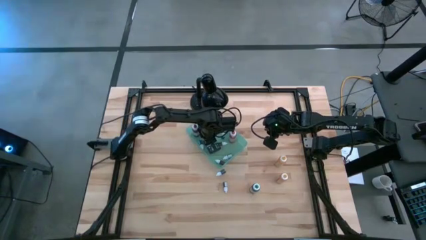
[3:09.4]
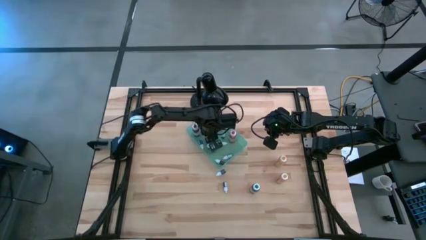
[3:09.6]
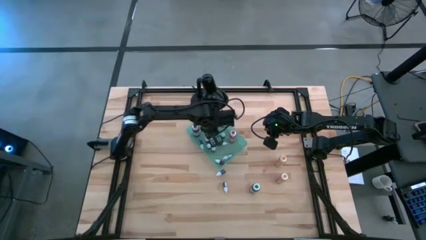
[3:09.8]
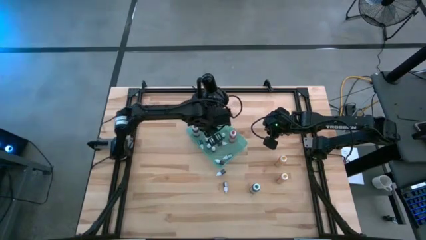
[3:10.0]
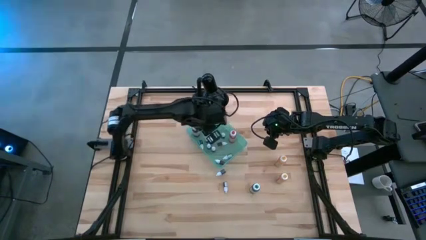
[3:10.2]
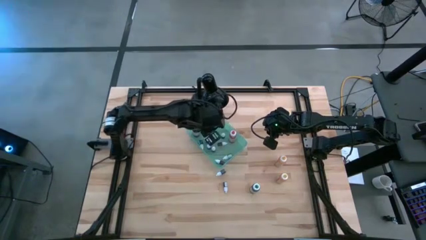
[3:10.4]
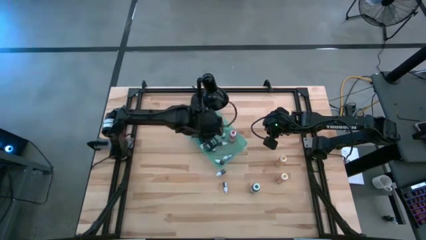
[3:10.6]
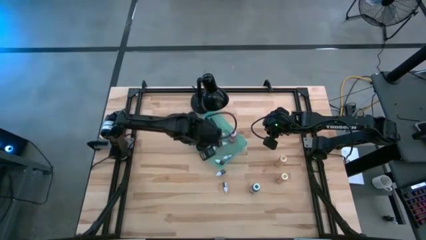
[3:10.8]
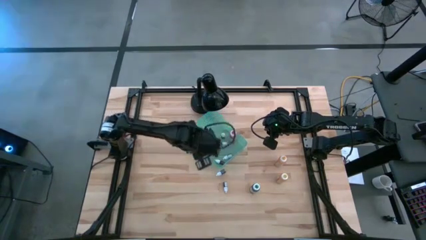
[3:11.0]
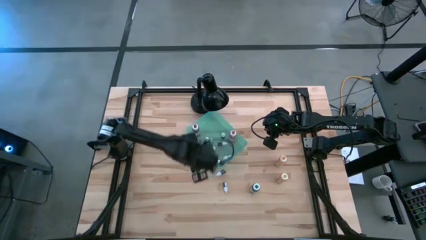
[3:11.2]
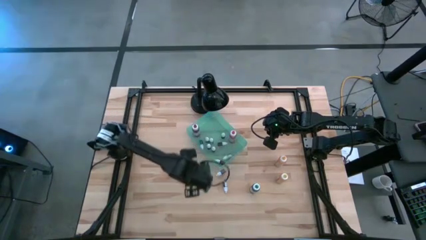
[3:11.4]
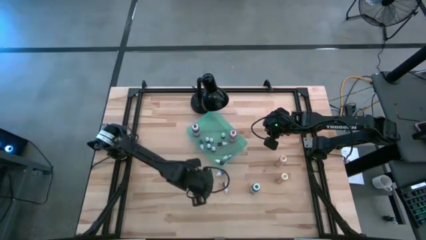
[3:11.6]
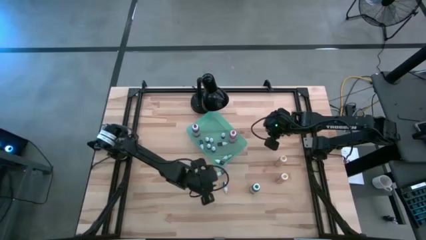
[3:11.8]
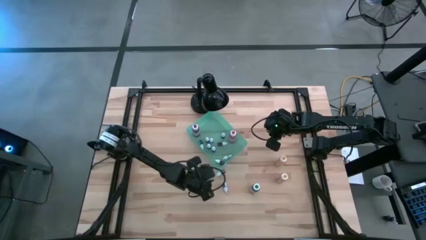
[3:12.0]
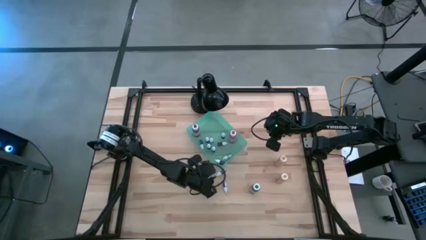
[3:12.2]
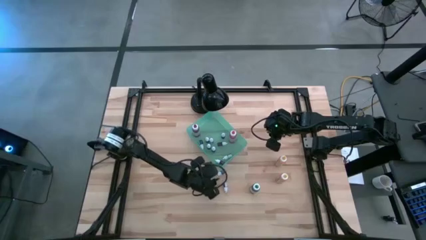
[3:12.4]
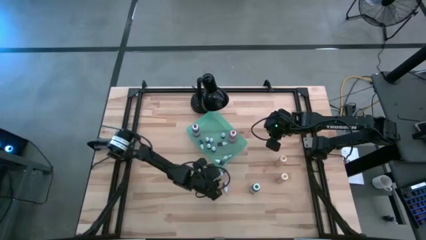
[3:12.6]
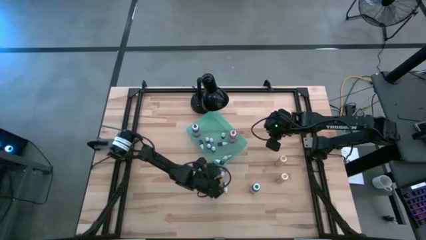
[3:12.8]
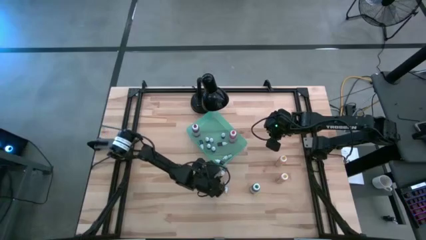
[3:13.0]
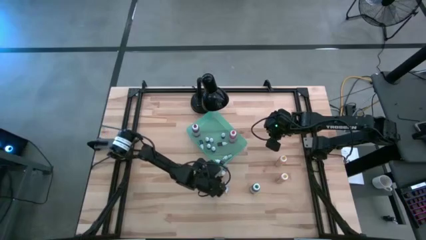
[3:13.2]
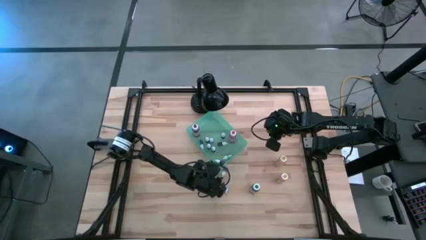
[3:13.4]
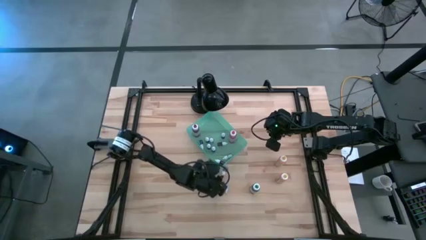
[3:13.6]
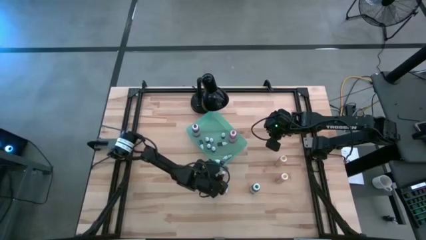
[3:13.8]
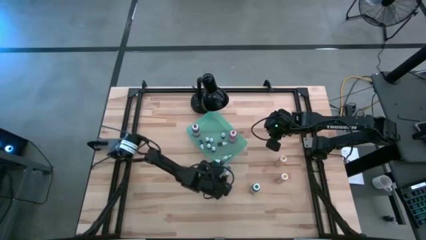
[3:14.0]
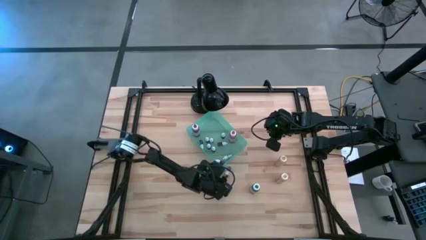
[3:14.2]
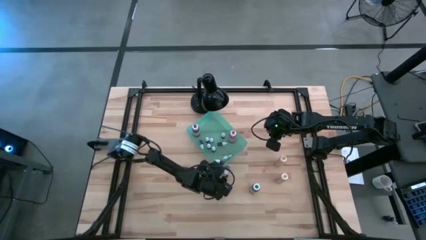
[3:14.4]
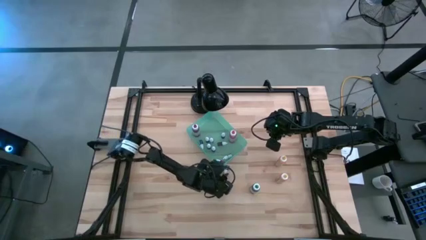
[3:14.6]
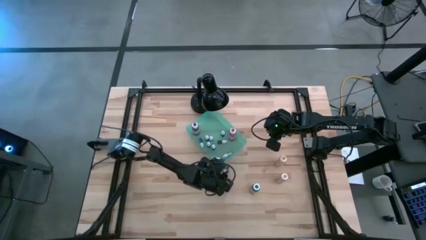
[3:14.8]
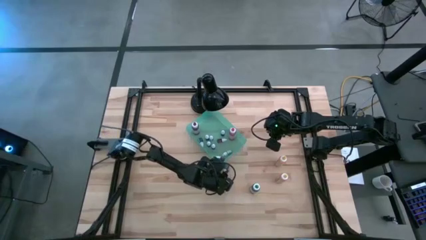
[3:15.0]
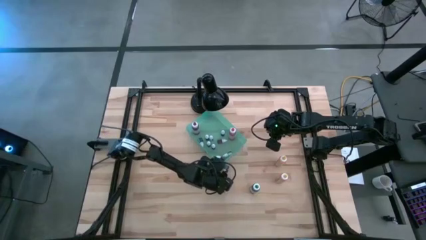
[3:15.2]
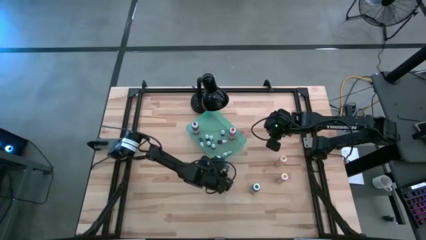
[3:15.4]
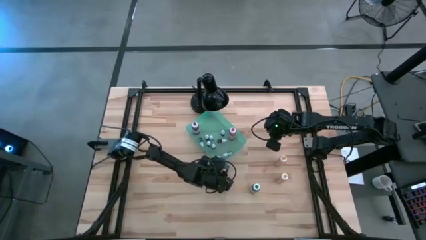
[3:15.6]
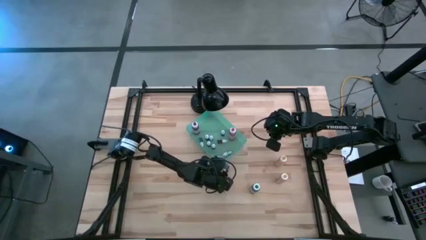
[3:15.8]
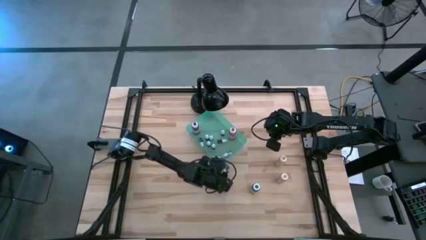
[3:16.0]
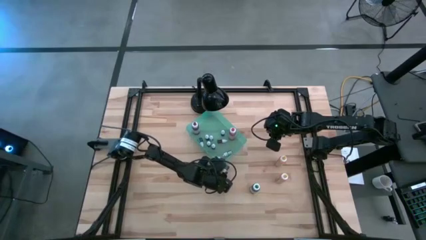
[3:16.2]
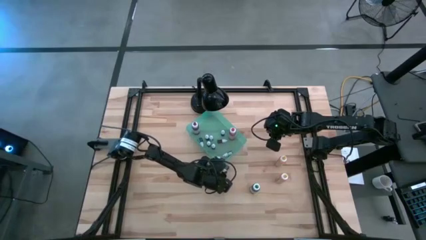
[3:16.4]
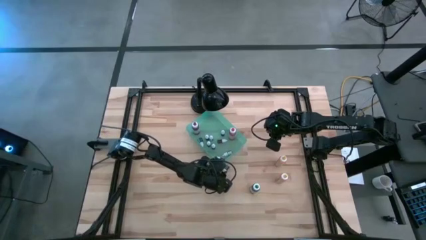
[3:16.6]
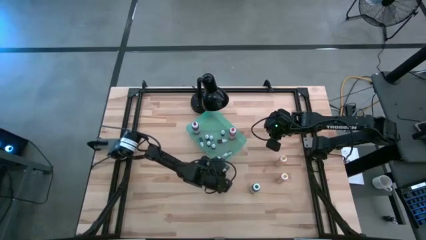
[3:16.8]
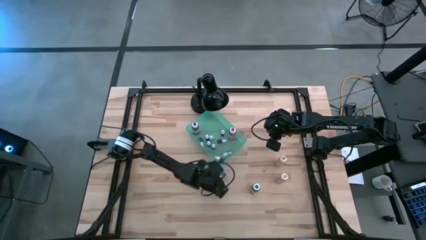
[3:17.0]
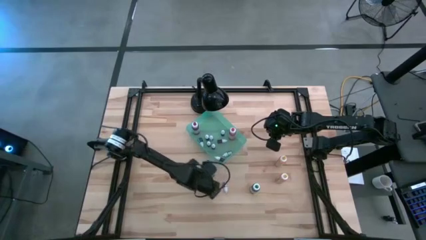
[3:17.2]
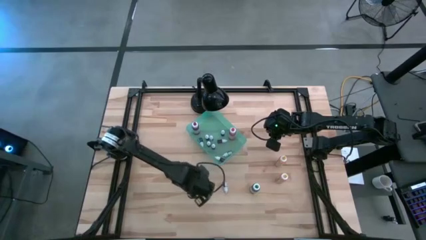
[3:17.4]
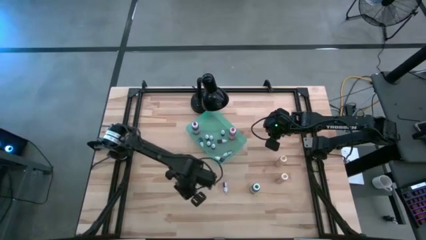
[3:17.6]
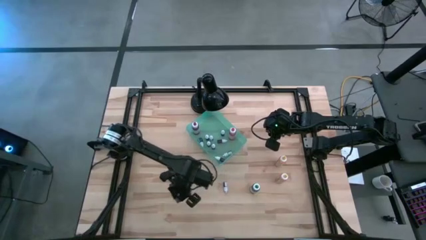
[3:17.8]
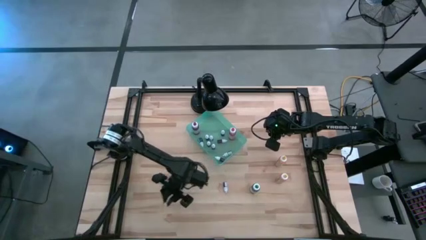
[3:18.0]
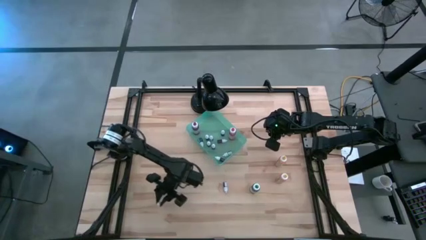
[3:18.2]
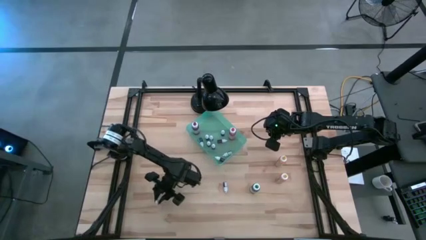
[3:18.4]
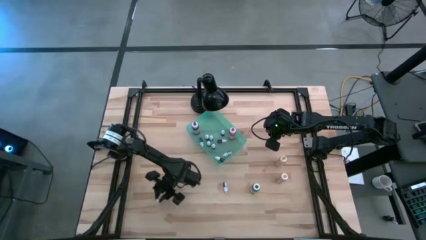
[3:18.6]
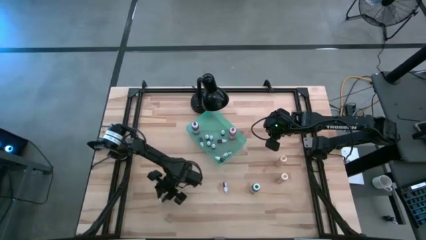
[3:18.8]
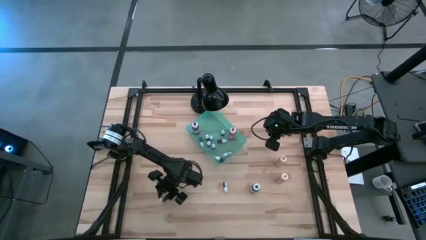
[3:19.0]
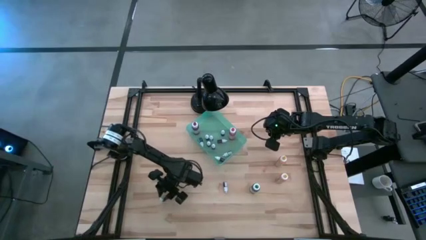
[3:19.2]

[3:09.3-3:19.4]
Task: Pick & Place food coloring
Adjust the small green food coloring bottle

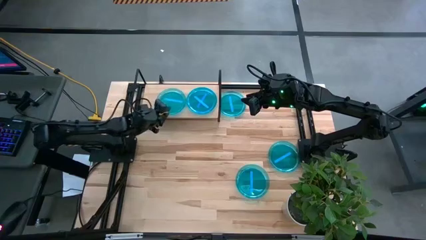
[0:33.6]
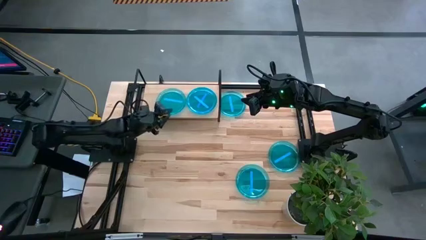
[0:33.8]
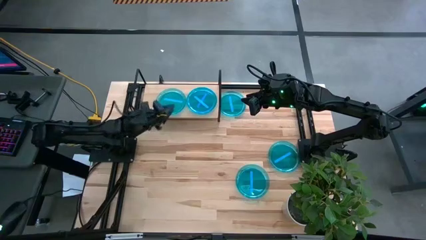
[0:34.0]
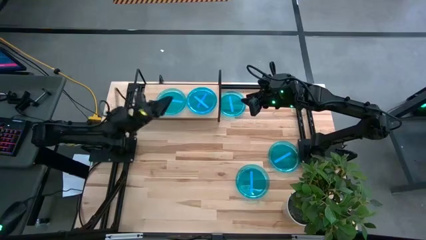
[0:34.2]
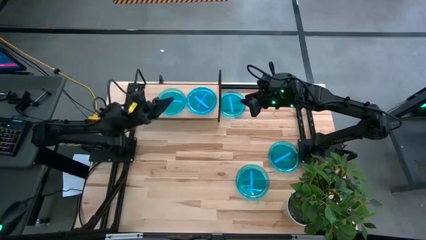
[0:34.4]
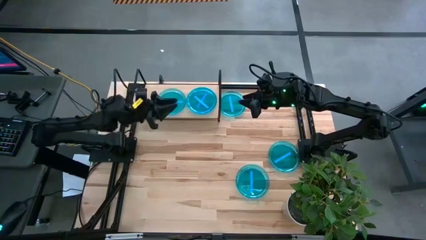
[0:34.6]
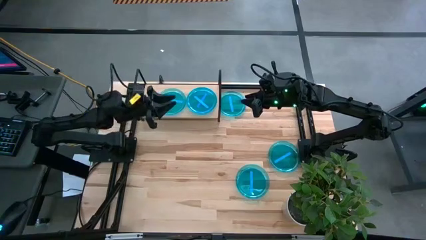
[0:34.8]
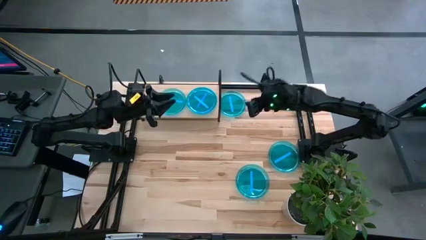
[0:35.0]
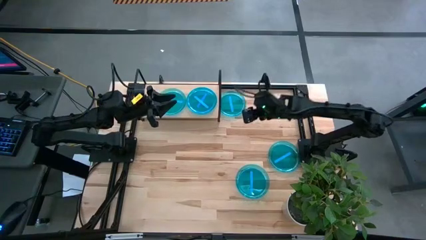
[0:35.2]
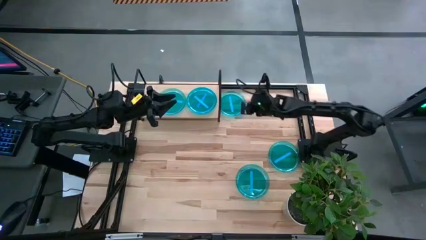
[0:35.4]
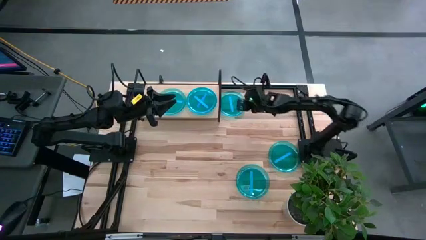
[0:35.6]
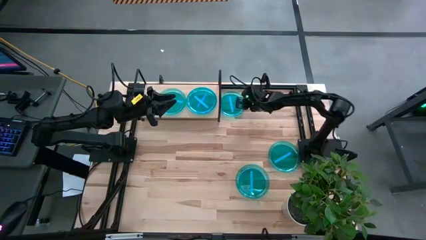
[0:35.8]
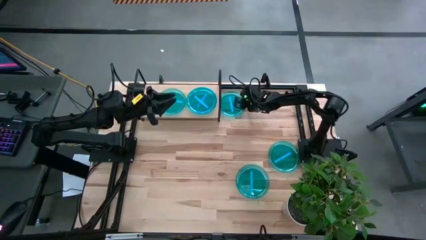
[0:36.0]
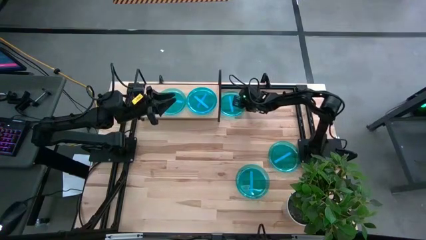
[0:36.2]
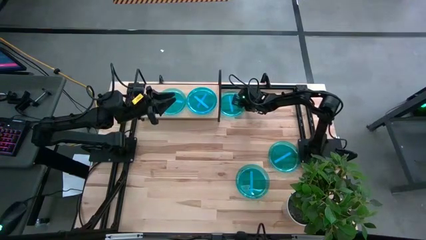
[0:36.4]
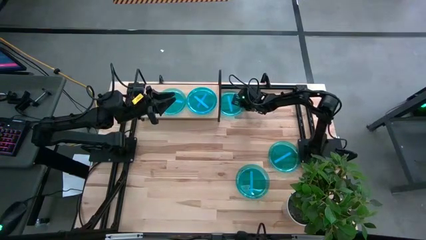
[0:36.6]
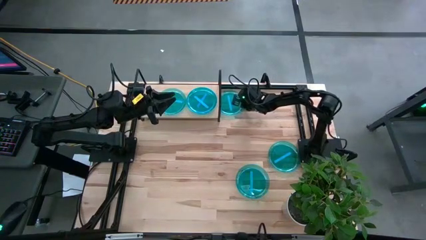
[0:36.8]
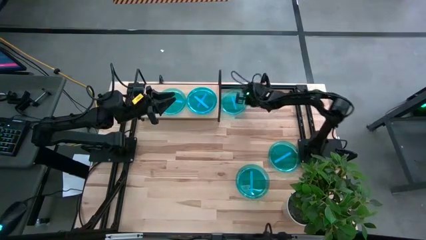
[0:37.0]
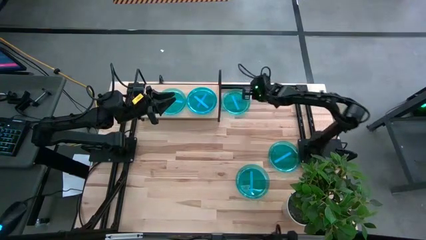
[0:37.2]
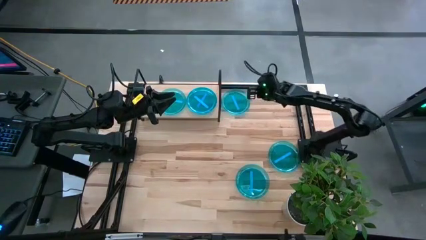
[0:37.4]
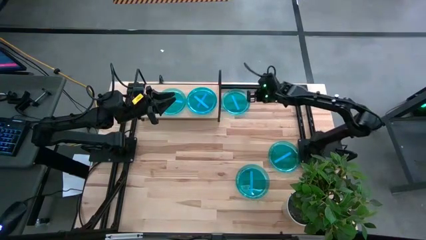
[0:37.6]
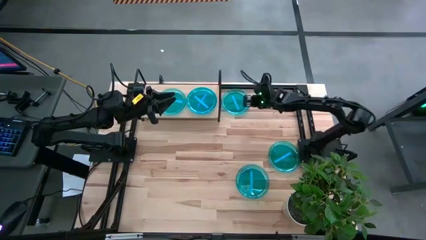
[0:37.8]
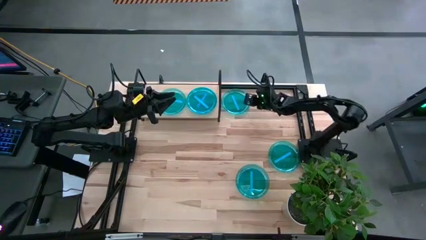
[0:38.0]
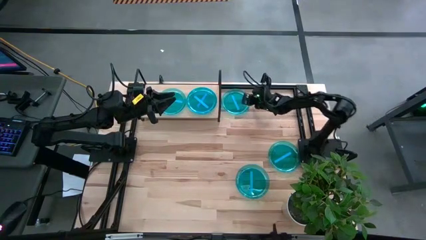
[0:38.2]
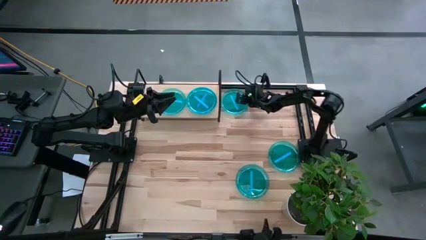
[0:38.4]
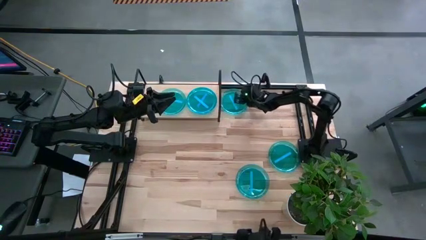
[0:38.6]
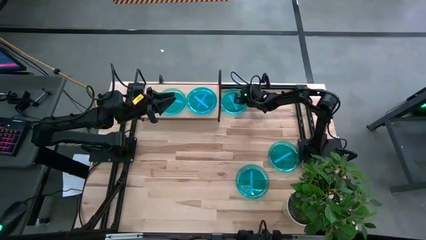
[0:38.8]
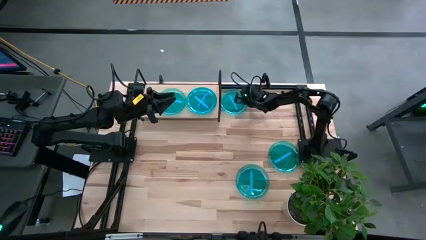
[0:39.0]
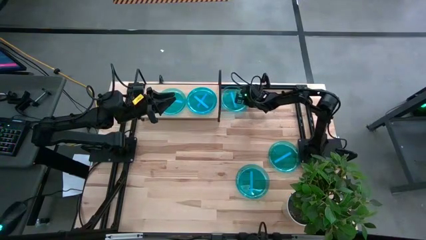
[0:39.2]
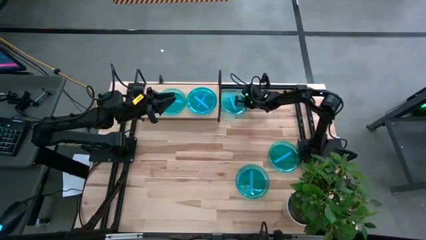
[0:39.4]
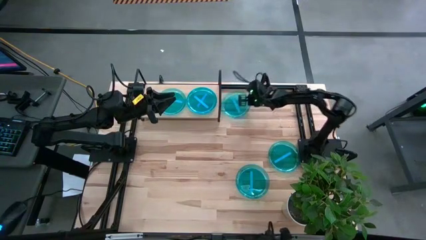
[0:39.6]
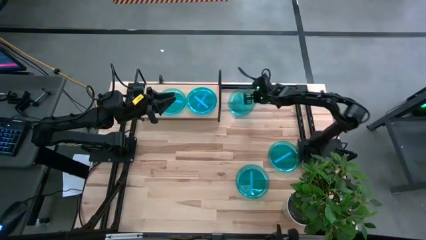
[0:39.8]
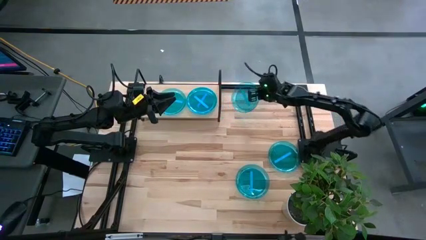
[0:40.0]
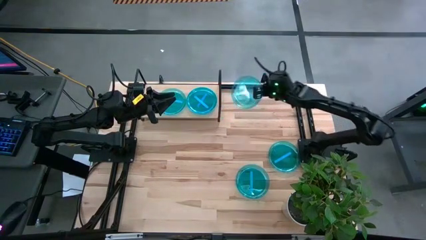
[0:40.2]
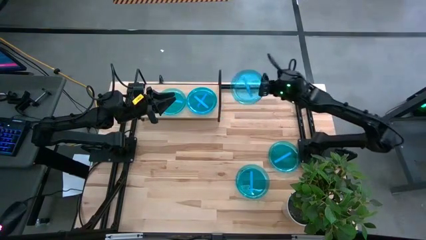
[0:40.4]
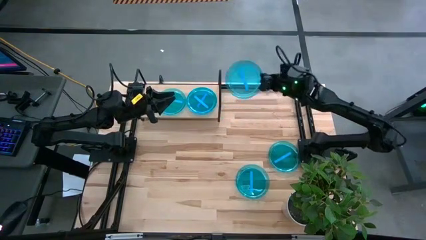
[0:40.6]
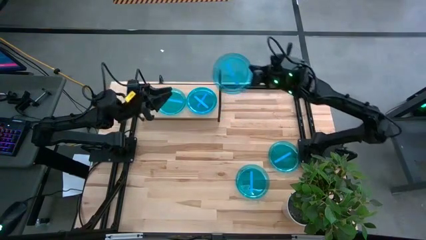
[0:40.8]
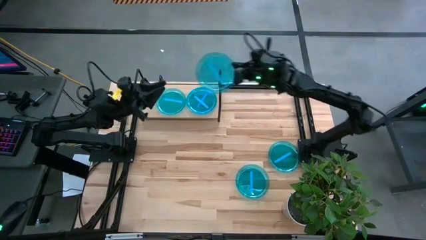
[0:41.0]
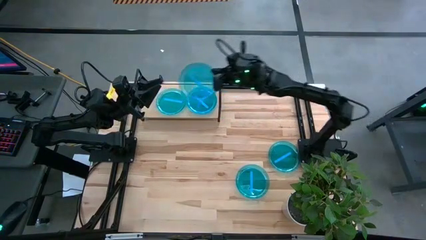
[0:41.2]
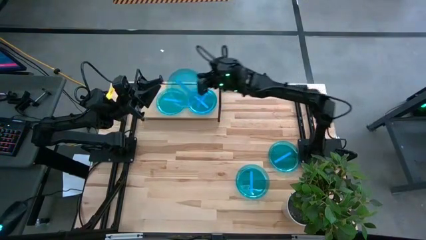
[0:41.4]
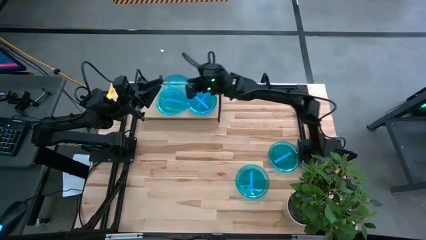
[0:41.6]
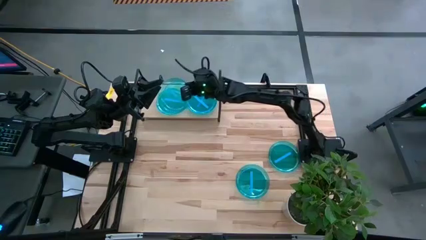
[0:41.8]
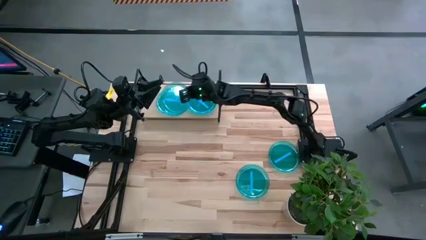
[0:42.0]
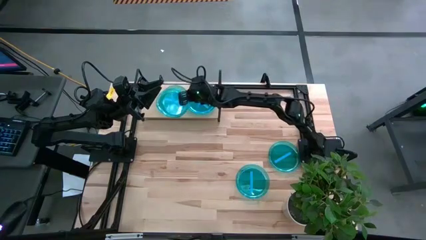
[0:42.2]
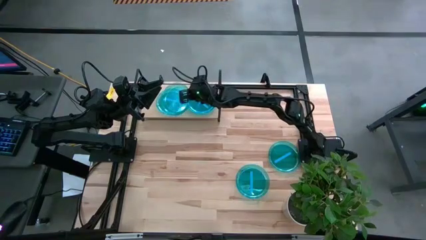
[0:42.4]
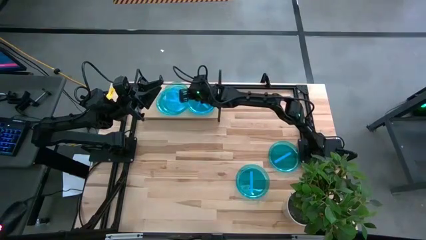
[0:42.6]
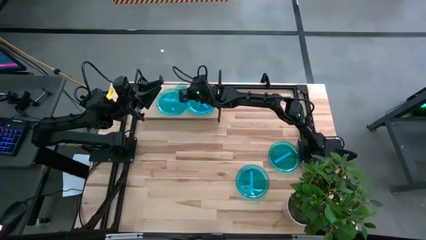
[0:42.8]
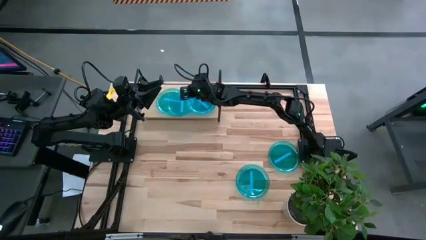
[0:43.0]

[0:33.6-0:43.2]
Task: Place and stack plates onto a shelf
Stack the blue plate on top of the blue plate on the shelf
